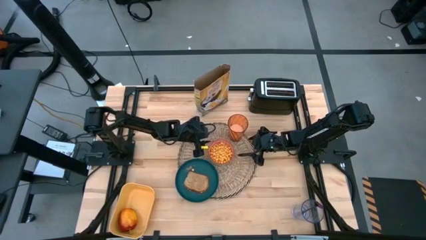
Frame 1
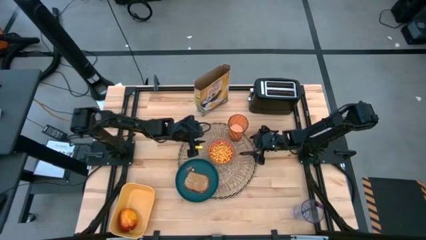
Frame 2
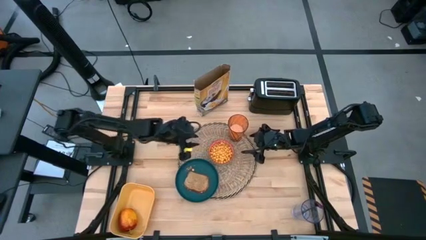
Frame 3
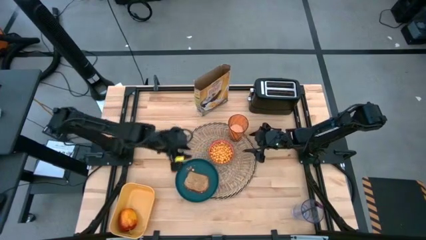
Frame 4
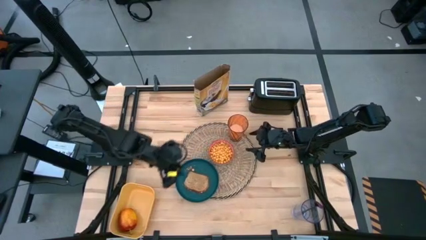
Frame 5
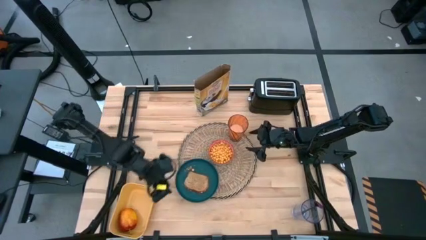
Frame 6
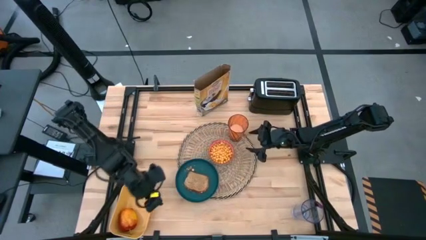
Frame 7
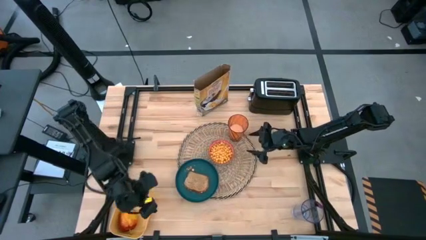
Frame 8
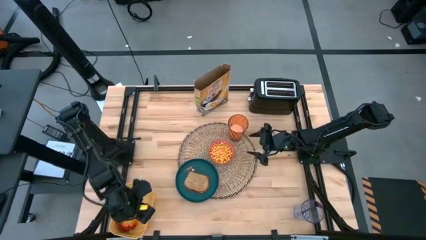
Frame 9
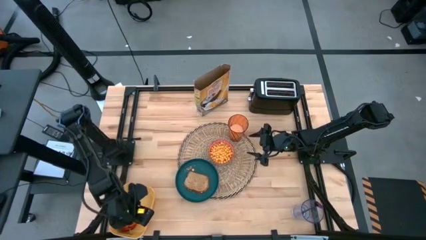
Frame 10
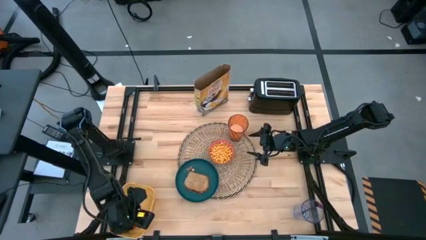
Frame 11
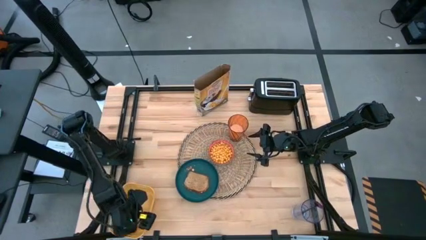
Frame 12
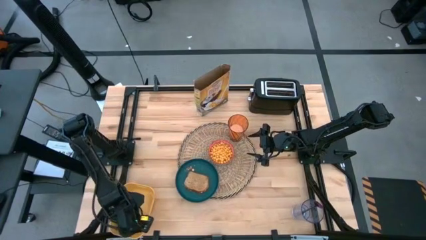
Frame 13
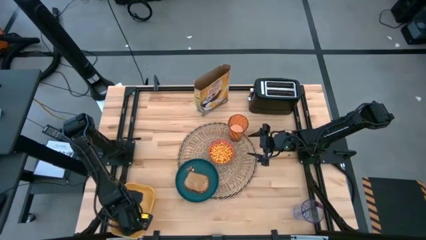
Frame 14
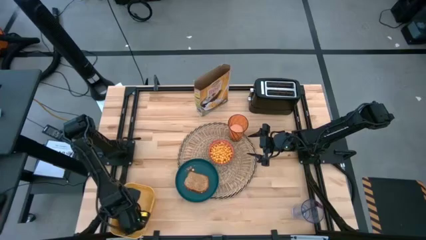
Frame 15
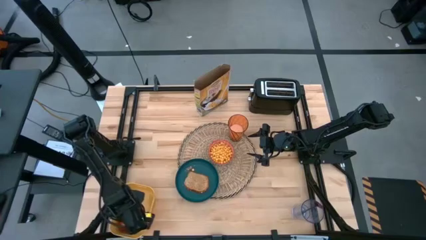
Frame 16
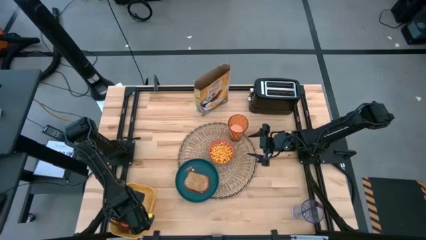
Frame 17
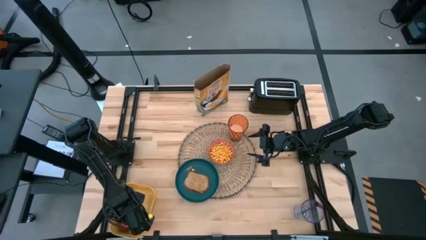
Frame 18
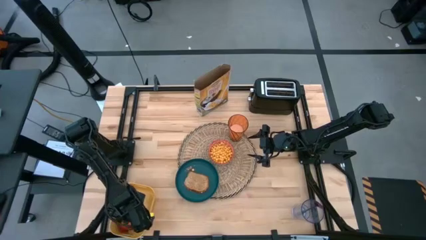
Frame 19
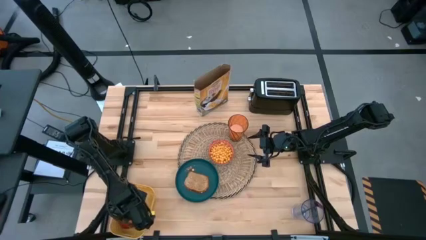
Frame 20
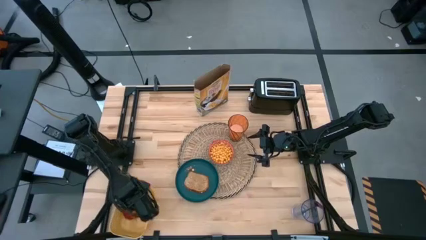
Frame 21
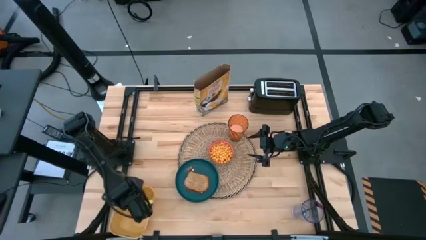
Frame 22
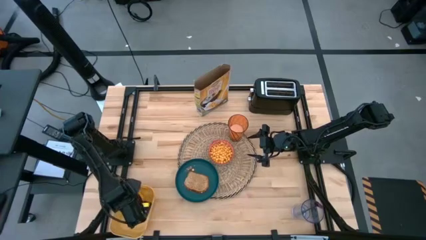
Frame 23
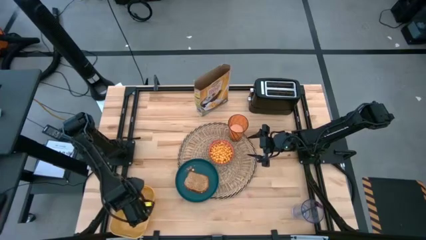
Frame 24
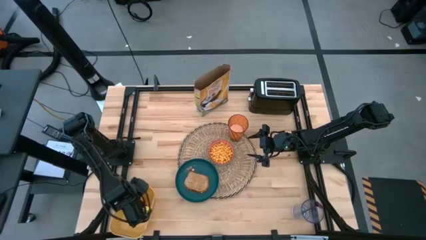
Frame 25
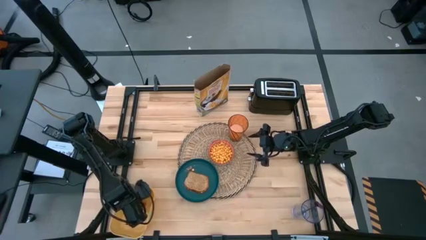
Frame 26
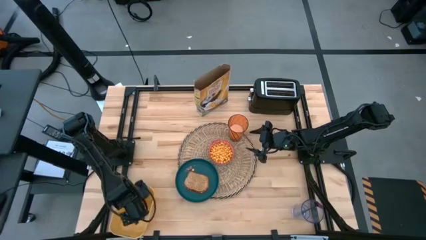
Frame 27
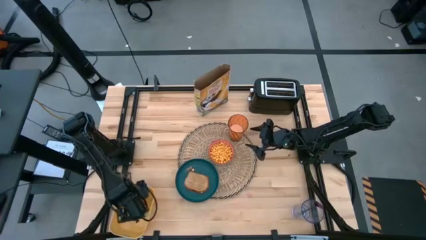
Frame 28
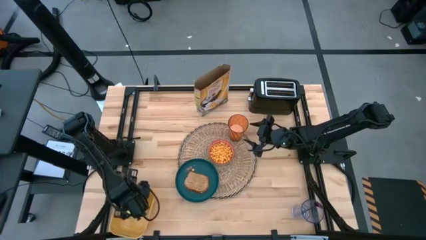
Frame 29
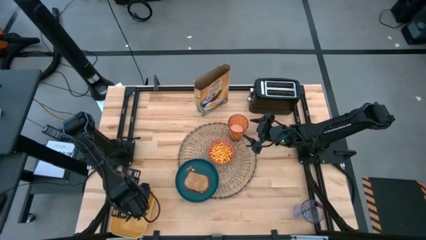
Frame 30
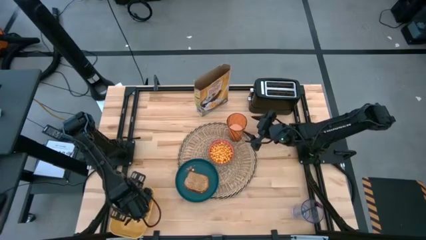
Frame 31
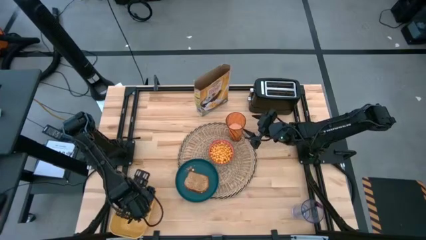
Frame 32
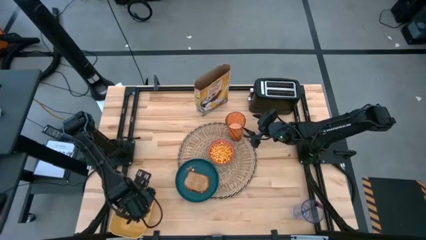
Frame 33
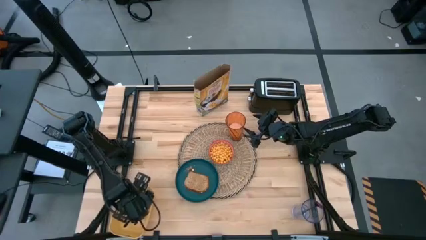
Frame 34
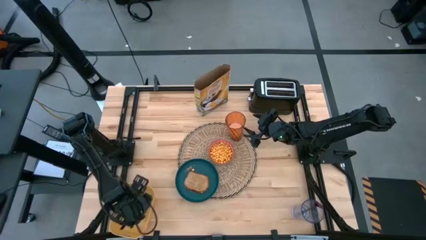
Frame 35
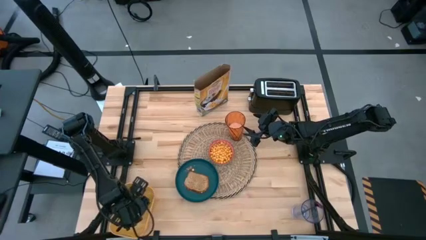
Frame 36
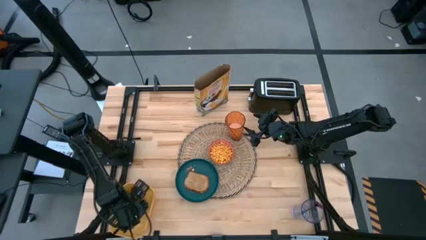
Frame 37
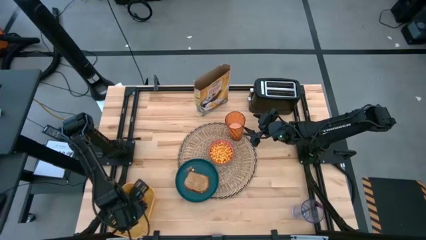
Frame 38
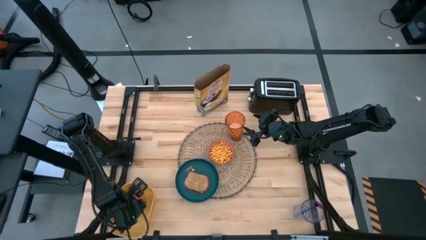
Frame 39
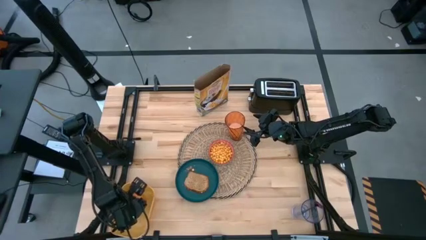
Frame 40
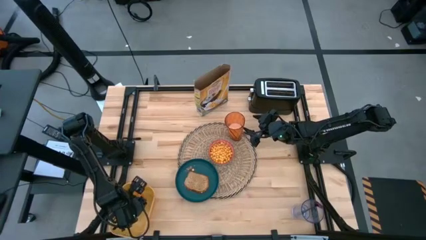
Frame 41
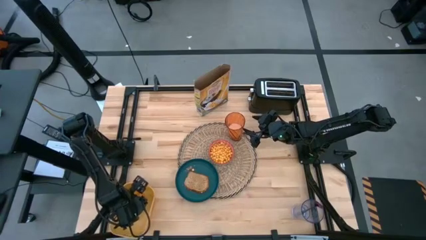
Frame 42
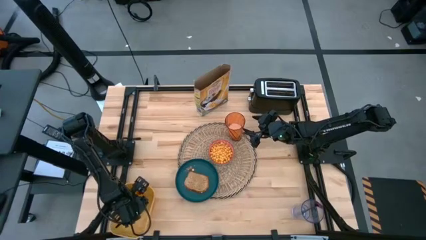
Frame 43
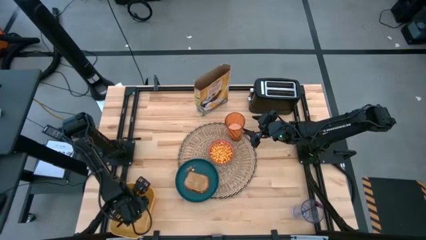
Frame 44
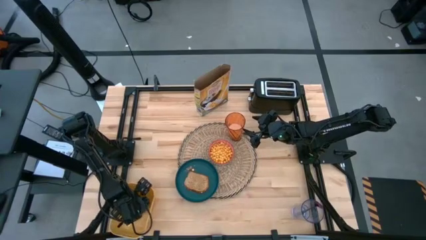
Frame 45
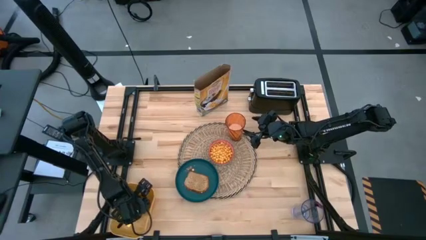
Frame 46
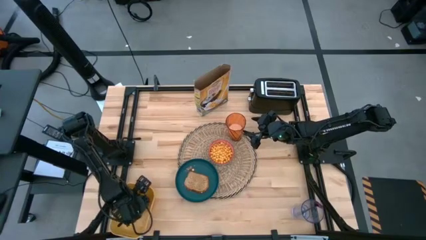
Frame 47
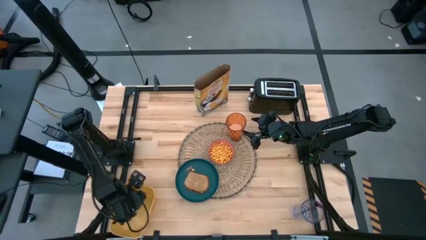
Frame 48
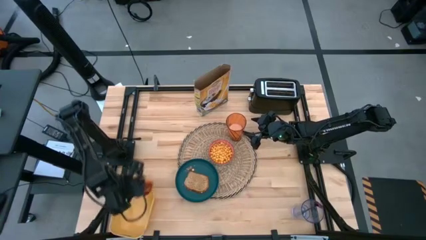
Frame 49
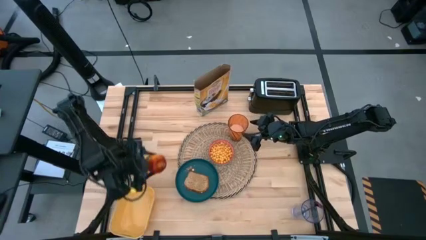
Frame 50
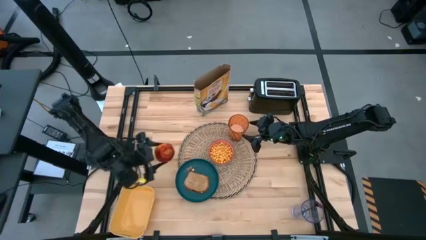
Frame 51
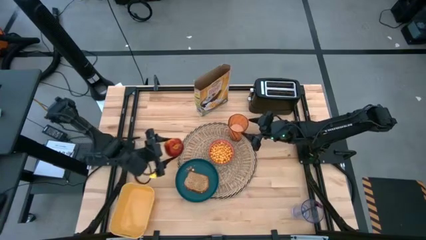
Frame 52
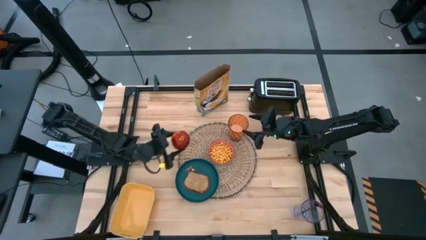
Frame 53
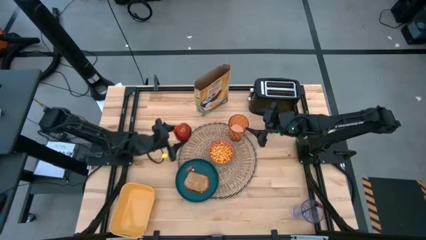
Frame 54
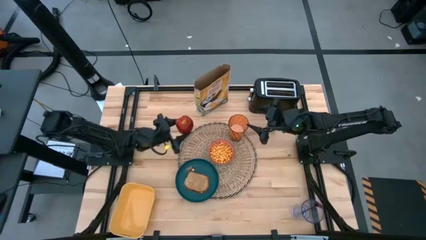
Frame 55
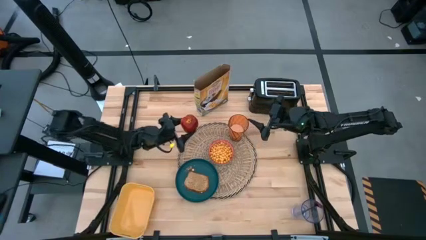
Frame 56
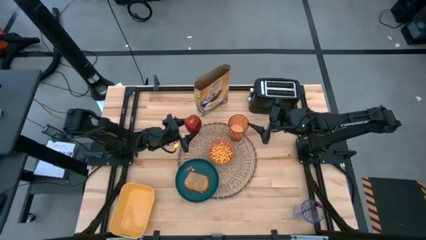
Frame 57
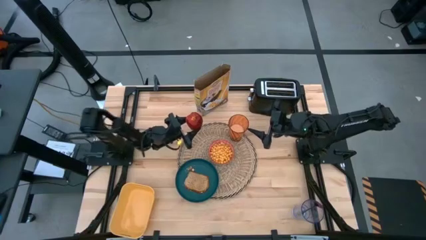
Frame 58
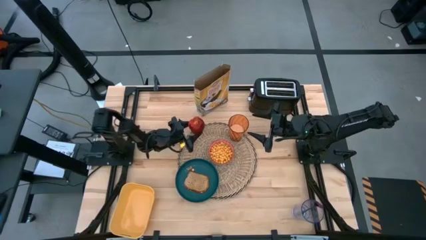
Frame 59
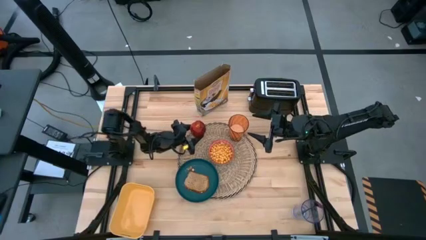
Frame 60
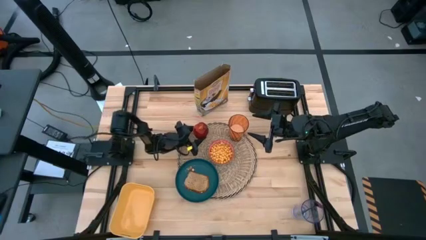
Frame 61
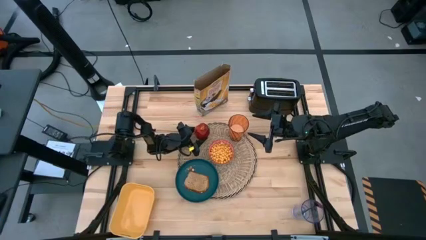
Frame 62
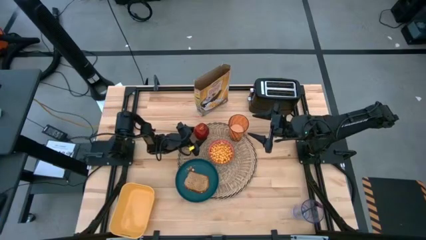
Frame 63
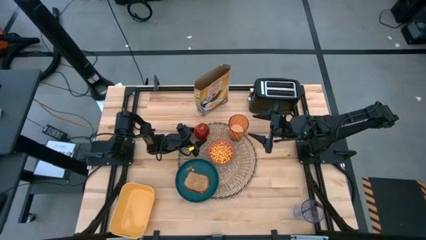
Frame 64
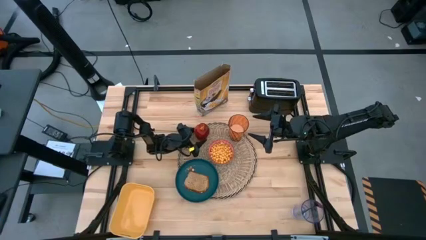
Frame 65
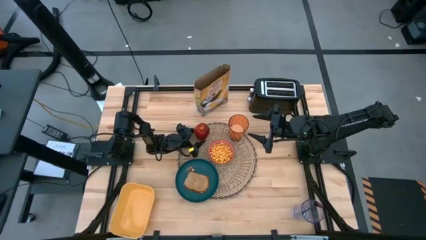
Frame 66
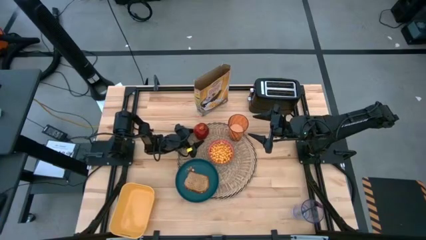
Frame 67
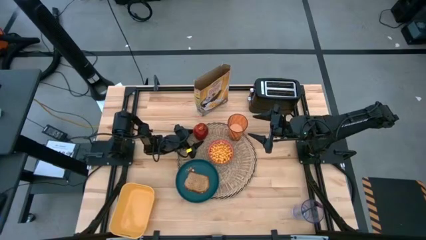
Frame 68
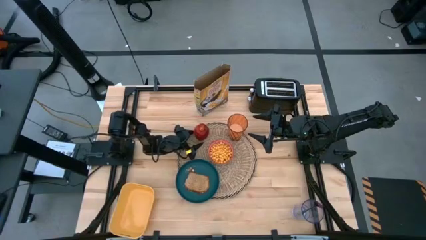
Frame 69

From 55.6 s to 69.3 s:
Task: Arrange a breakfast setting
Put the red apple on the brown table mat
